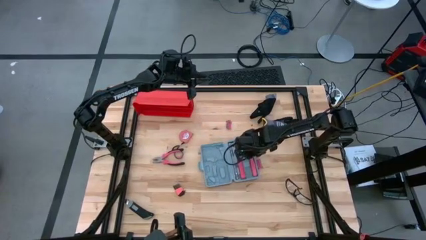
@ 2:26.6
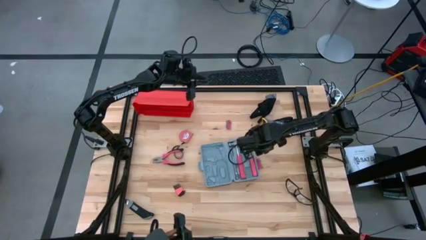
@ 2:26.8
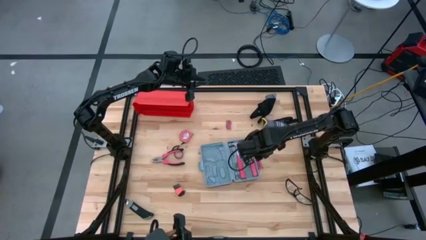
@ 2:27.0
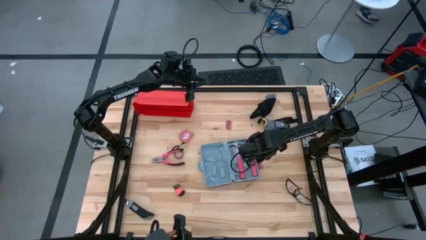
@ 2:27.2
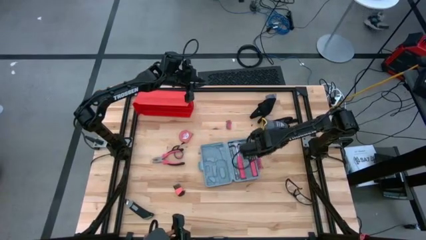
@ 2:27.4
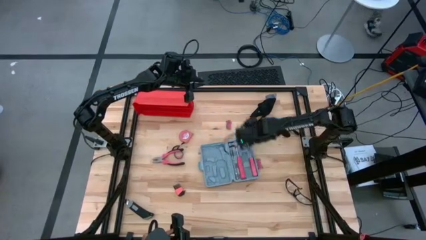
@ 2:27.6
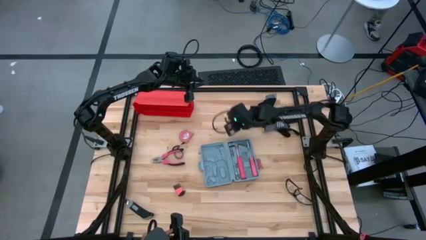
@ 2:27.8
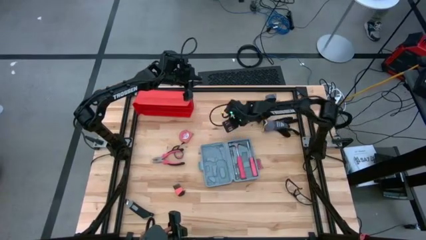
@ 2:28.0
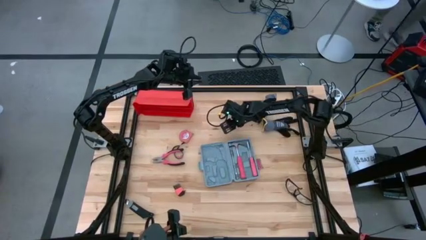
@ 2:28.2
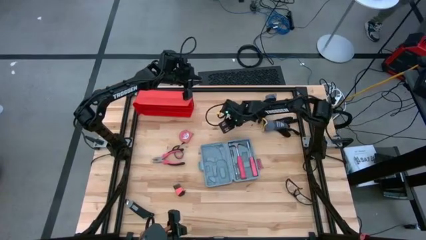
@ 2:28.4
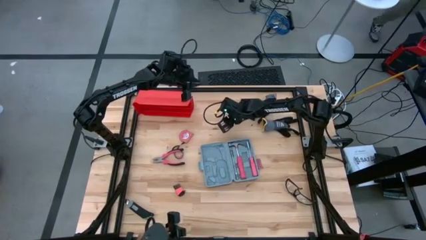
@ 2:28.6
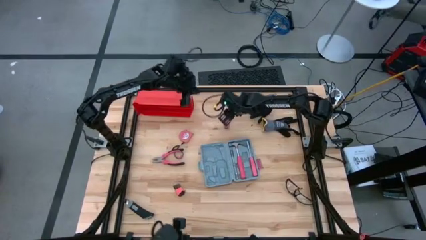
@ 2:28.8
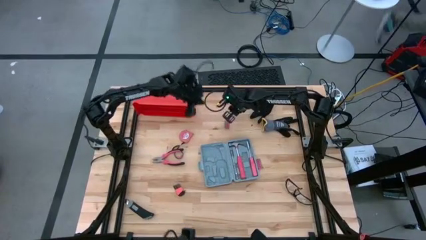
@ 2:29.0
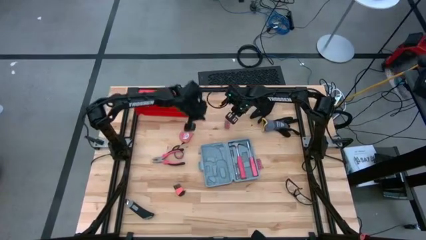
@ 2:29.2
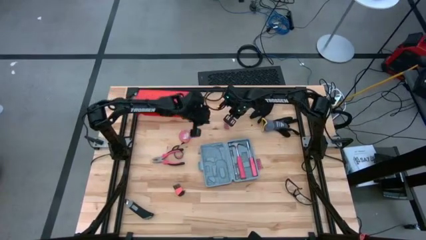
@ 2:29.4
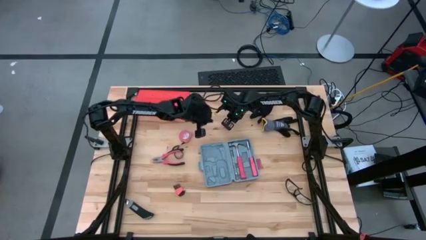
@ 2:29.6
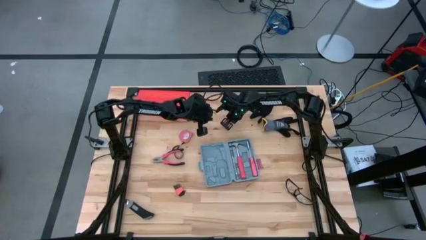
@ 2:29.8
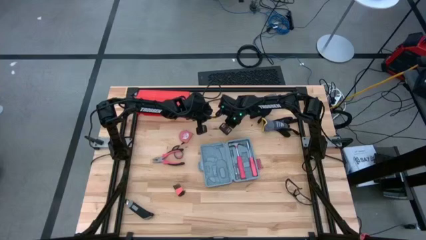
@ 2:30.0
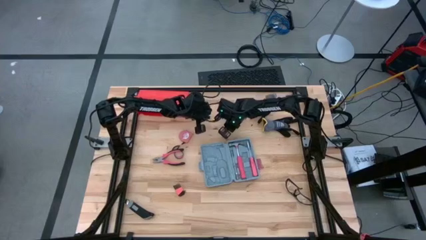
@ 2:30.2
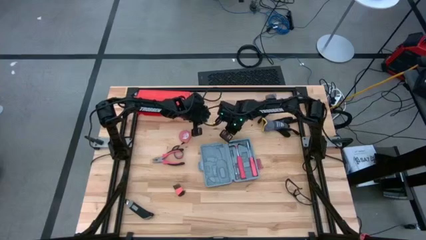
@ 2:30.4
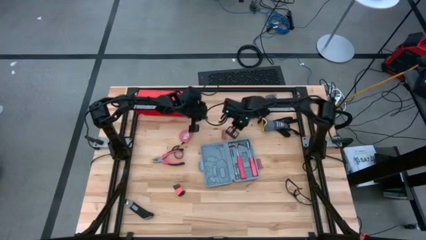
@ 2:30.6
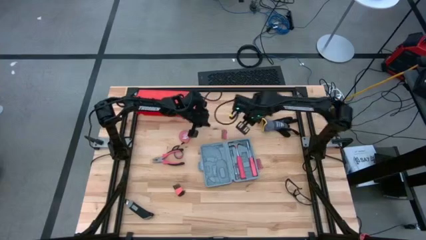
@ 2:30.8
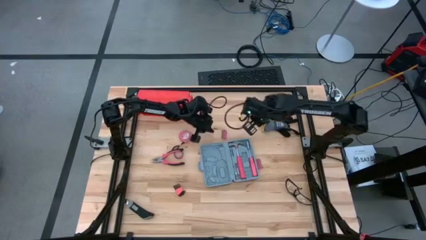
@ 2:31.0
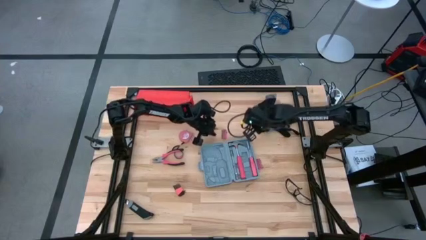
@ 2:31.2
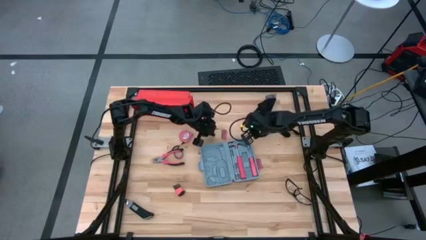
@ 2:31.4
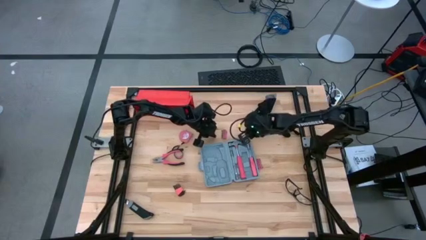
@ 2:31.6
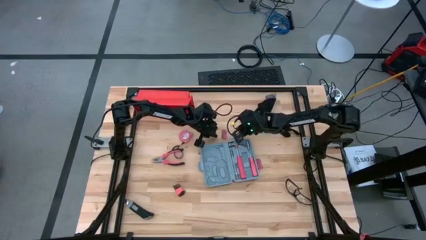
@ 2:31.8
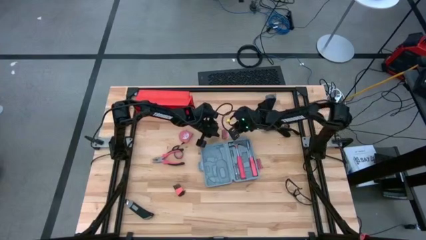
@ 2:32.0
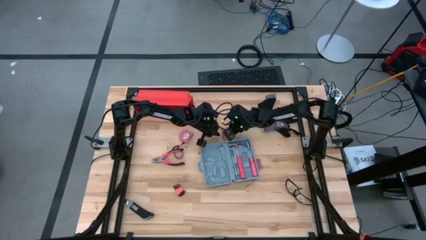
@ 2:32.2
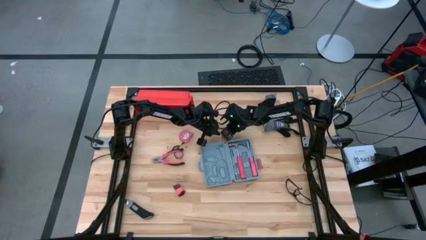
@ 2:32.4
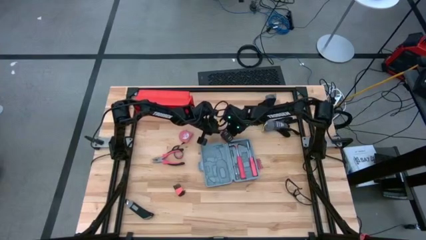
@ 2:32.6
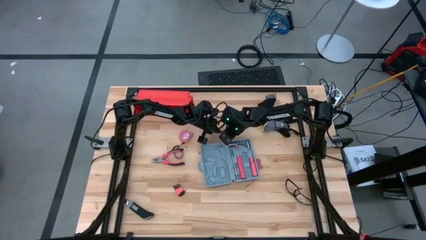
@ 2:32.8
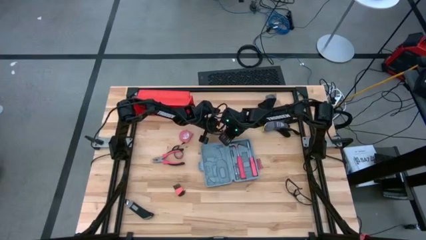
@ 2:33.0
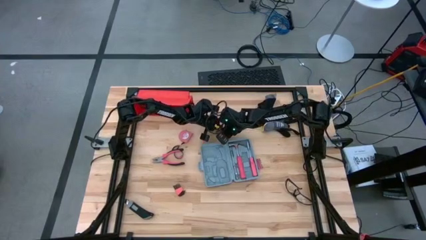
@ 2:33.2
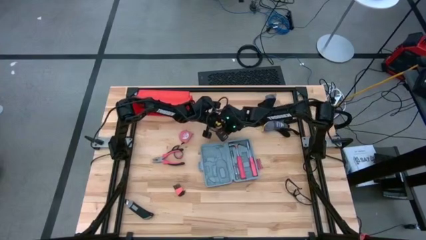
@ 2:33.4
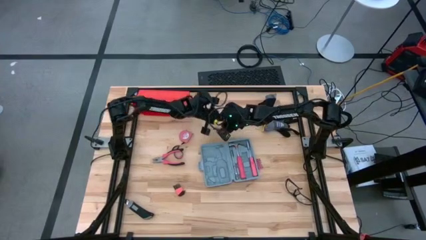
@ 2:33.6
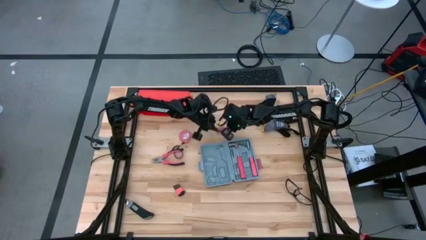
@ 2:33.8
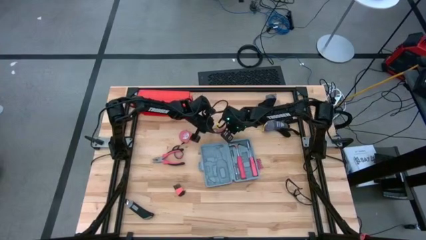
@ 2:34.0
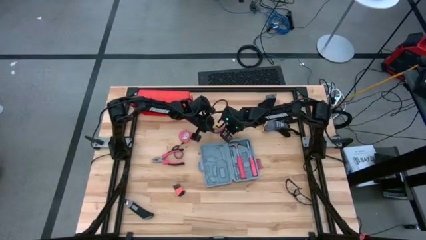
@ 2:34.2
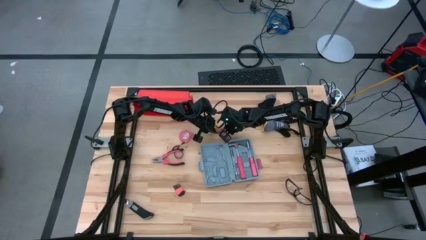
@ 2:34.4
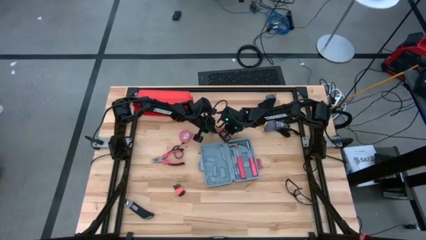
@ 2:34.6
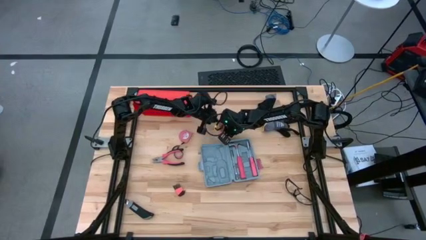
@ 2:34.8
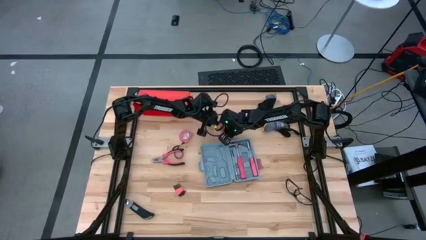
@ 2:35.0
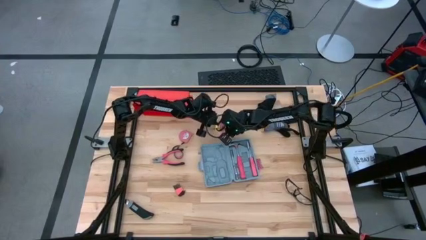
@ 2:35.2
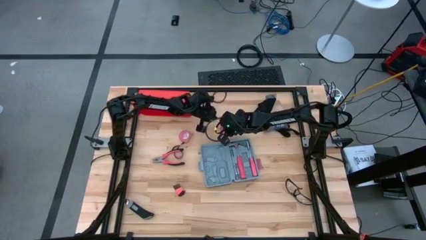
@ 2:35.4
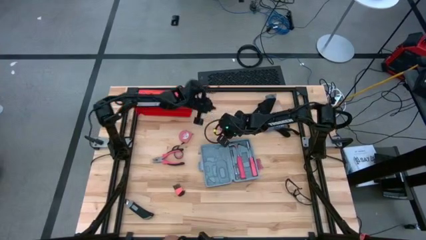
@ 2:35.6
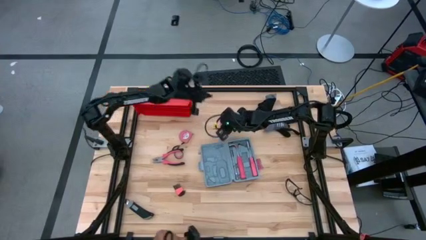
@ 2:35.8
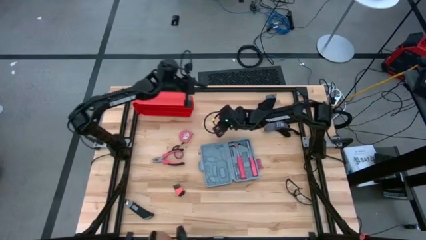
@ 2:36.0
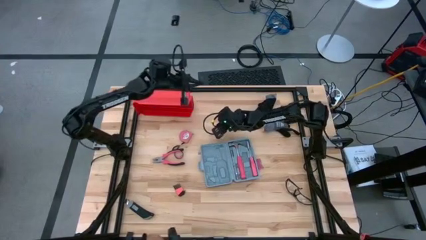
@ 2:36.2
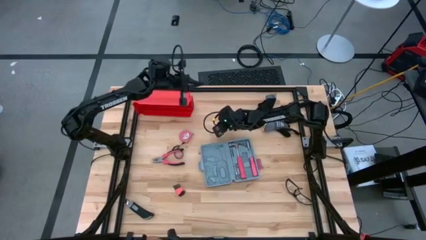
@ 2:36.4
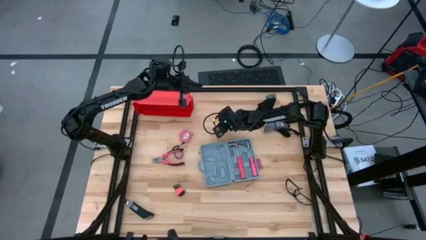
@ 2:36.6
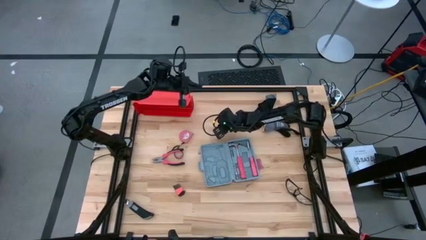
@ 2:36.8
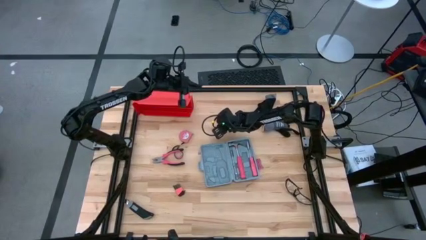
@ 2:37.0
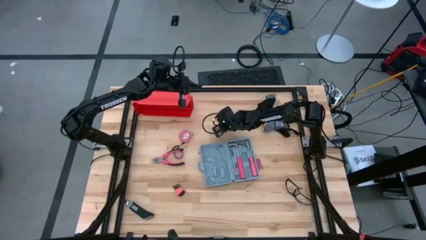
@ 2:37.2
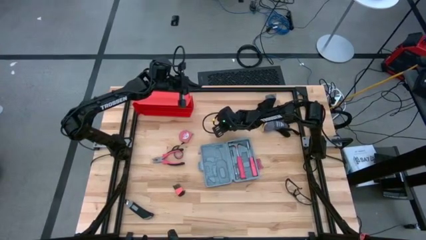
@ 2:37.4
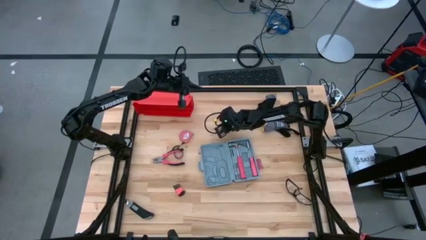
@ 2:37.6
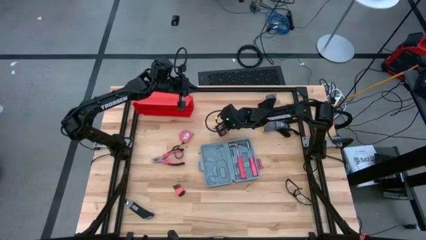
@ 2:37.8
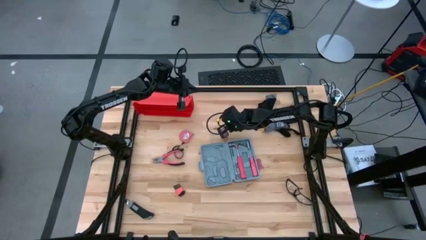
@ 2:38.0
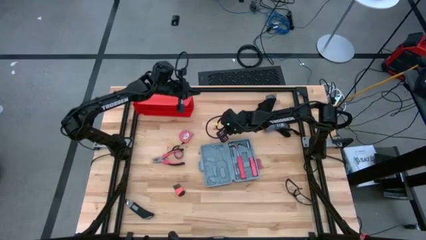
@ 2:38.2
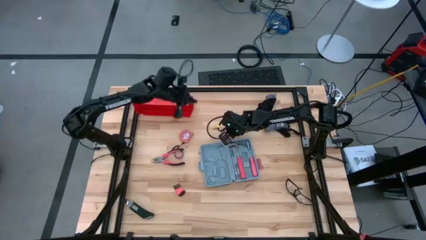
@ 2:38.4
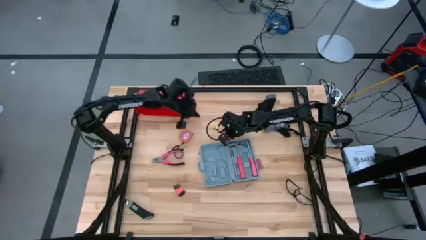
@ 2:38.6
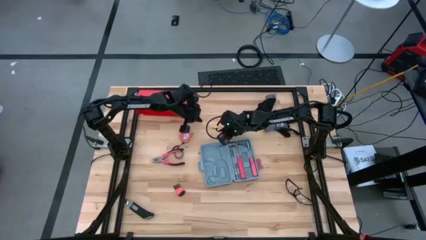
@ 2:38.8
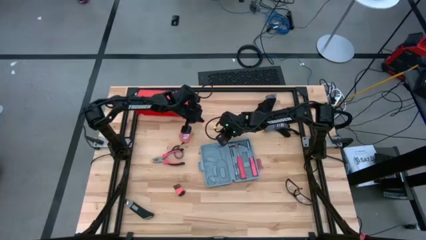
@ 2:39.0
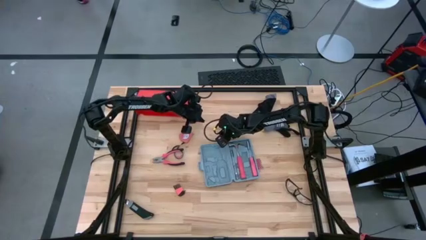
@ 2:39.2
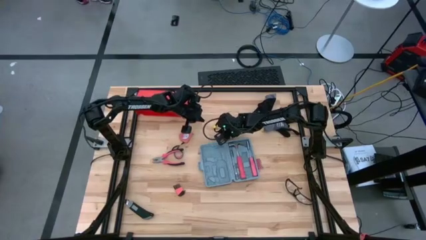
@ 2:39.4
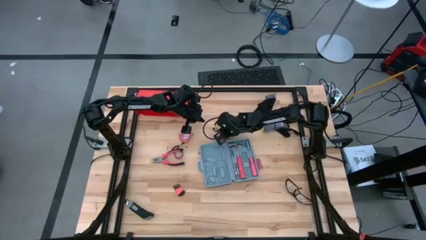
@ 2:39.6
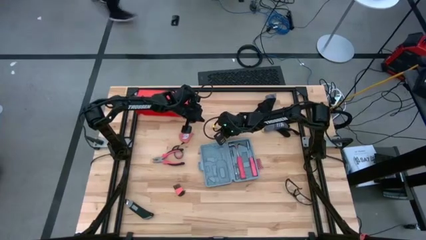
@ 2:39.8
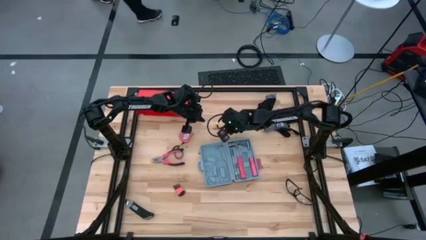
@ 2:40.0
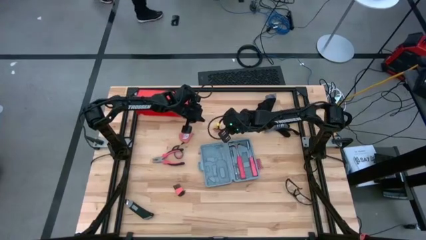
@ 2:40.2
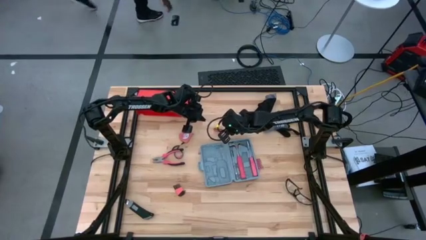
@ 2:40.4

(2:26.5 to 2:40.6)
Task: prefit tool cases
Put the top orange screwdriver bit set into the gray pre-fit tool case

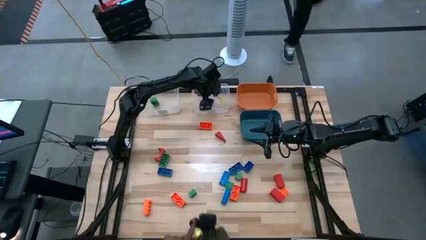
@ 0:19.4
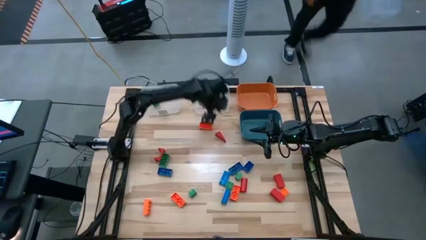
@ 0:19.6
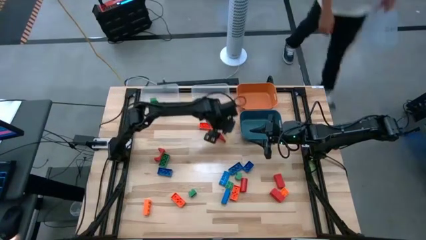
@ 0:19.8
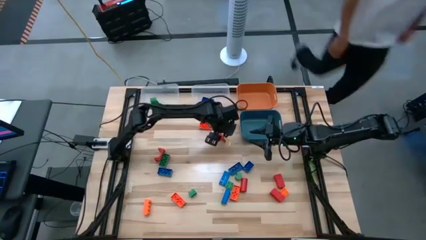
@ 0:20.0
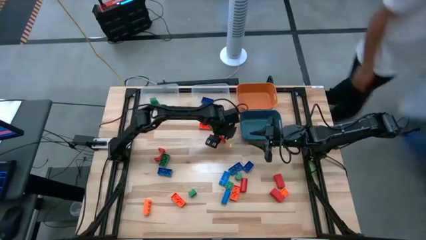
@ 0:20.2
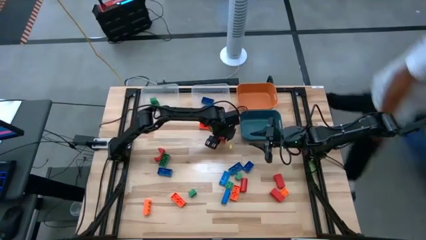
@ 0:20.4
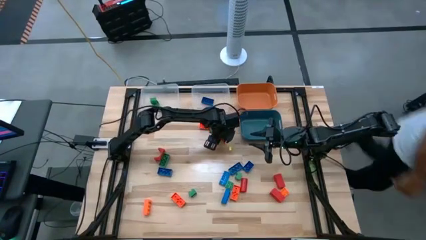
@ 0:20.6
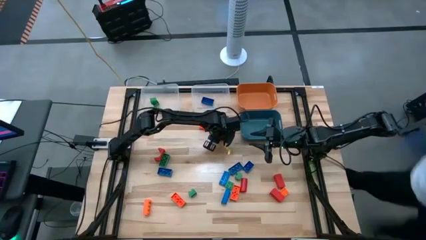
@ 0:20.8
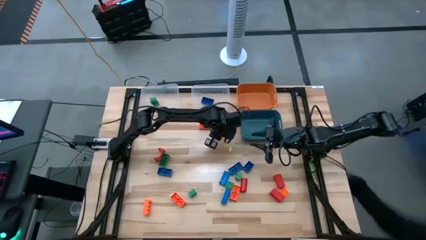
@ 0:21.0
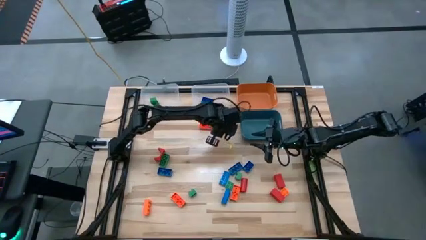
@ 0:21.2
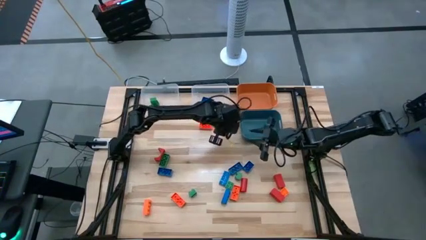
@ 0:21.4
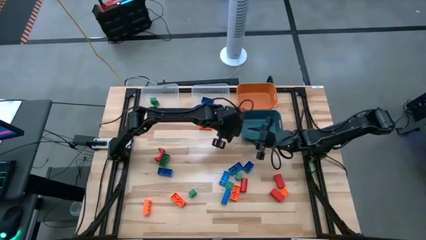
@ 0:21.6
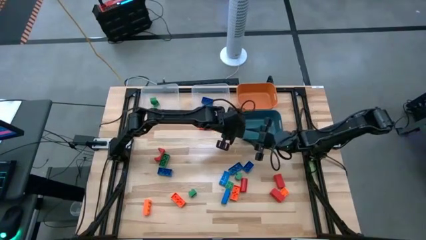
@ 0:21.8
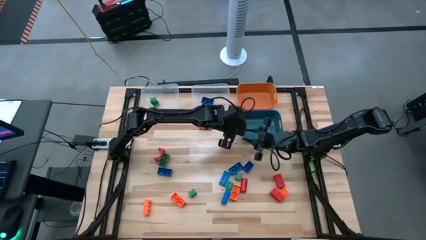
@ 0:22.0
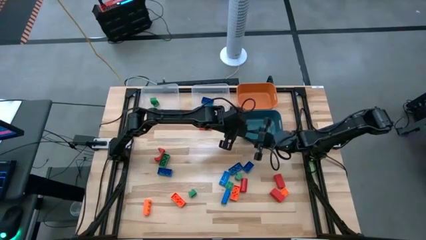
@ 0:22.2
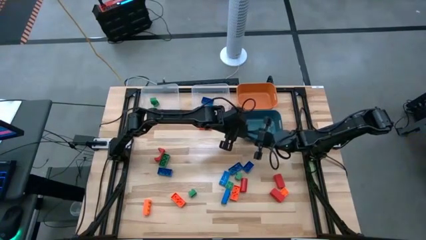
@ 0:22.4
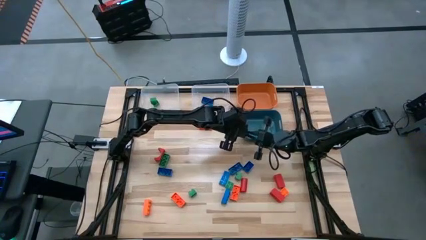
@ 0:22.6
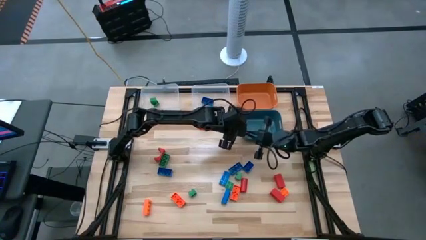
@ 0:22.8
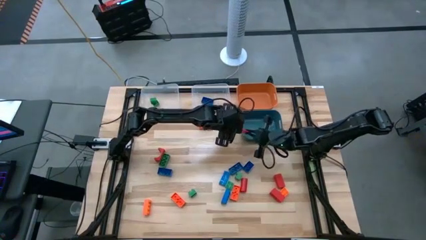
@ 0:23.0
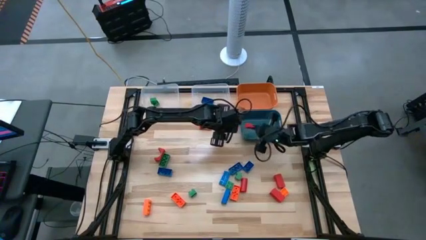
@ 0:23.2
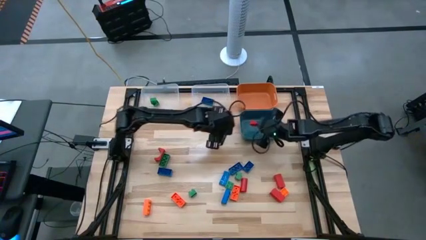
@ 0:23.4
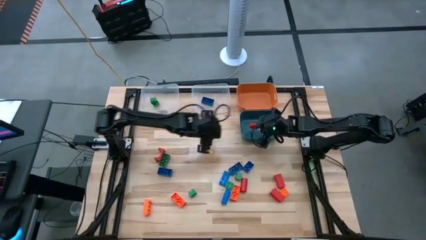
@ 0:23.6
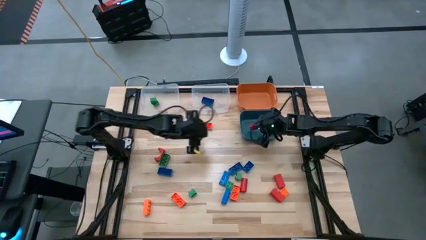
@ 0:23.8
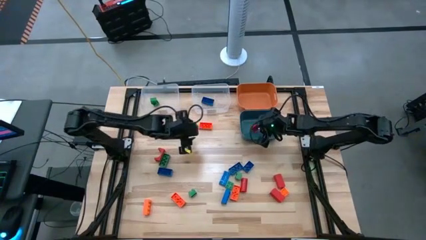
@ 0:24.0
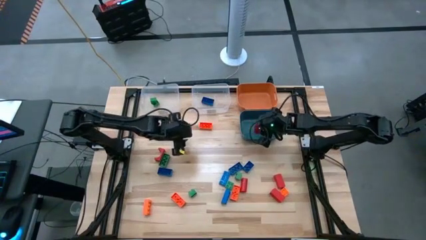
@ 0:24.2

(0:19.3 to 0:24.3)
Task: Sort blocks
Put the red block into the blue bin
